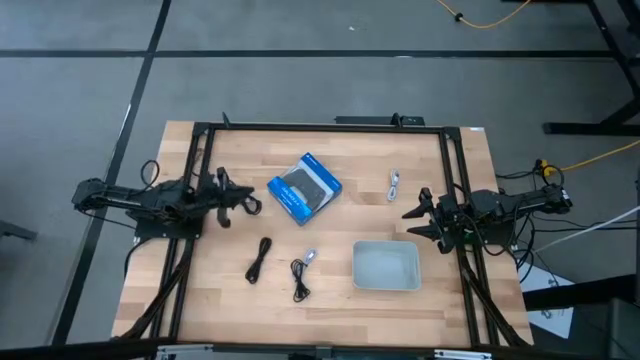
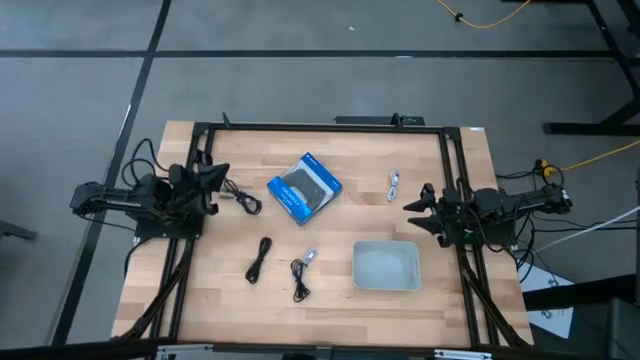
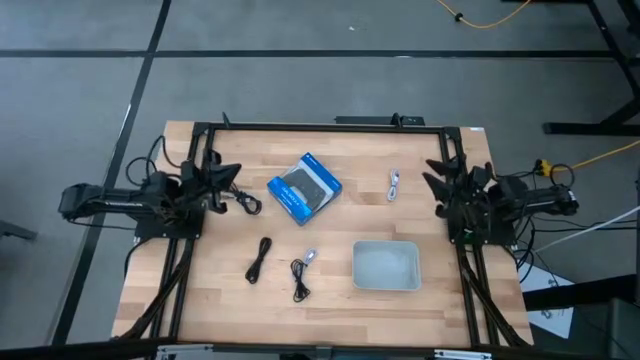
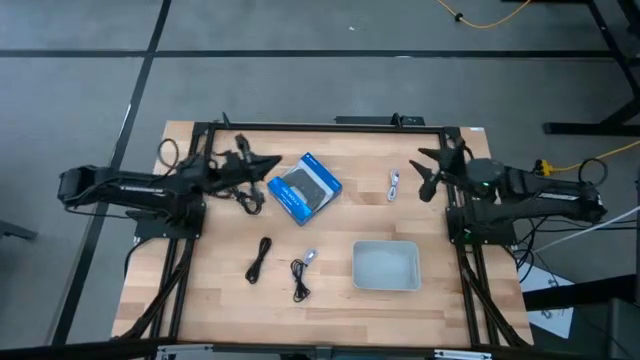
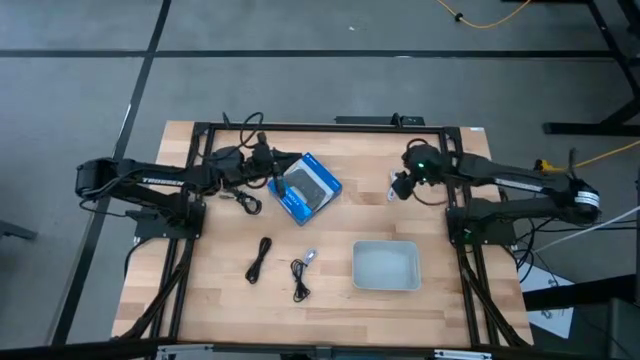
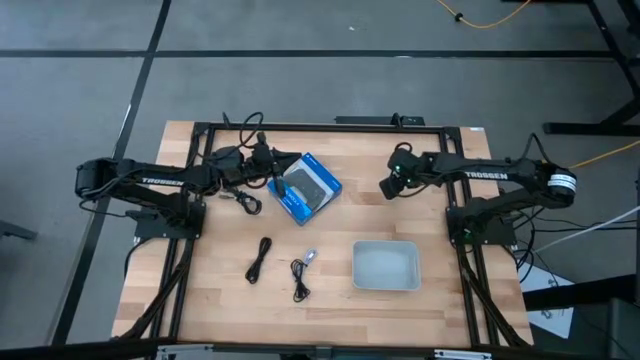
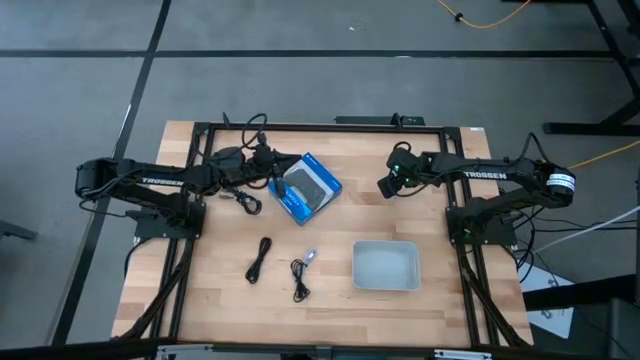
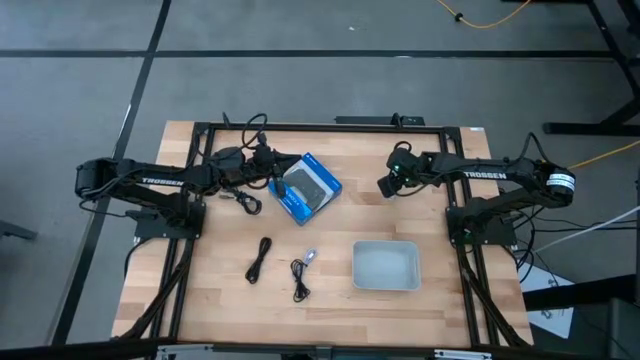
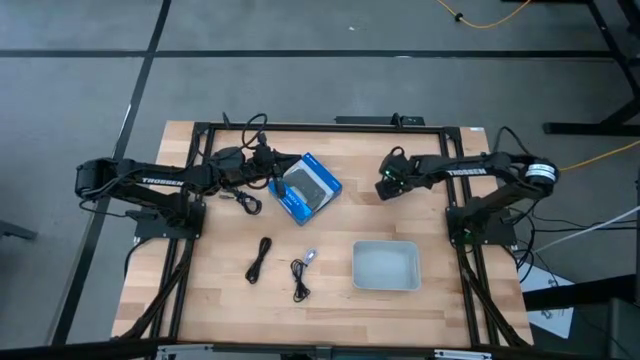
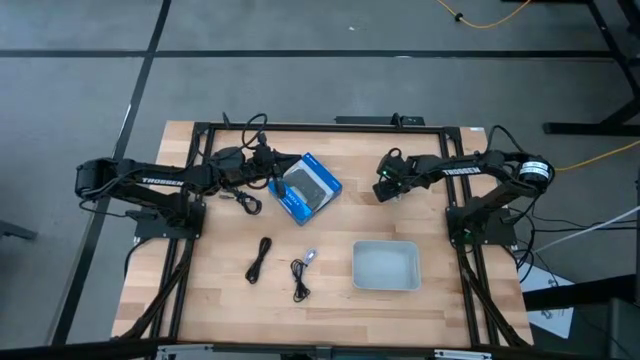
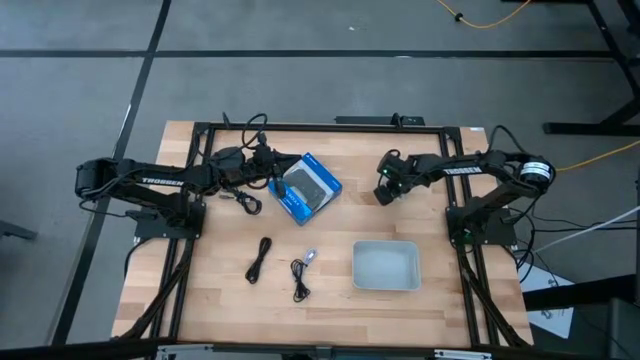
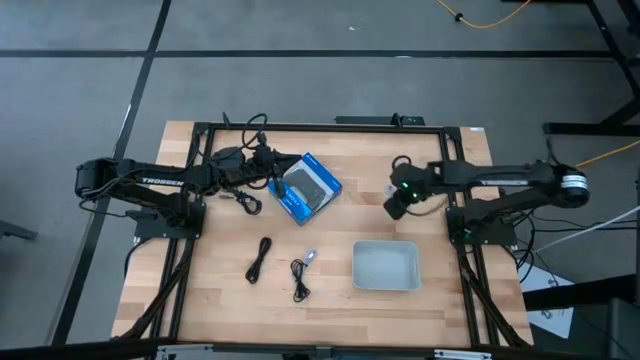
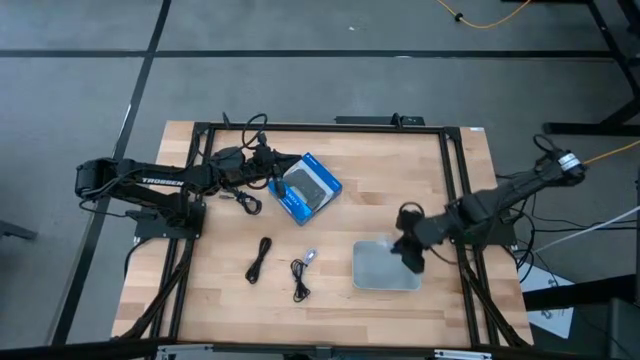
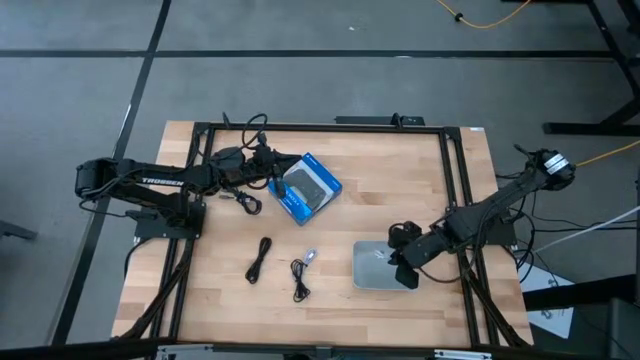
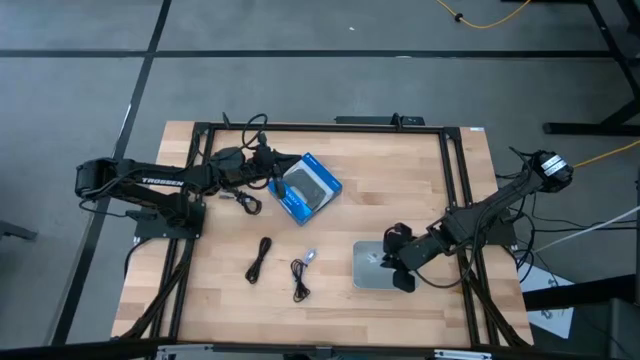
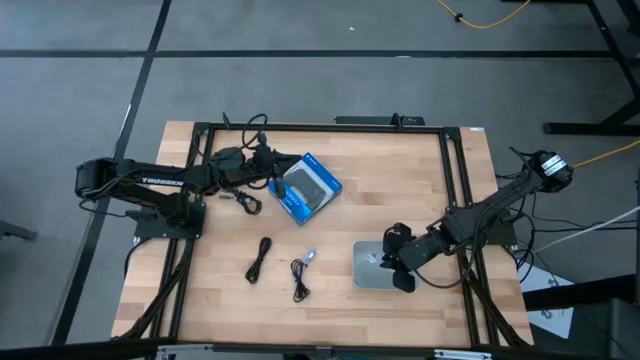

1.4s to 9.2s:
Task: Pick and place USB-C Cables
Put the top white usb cable into the gray bin

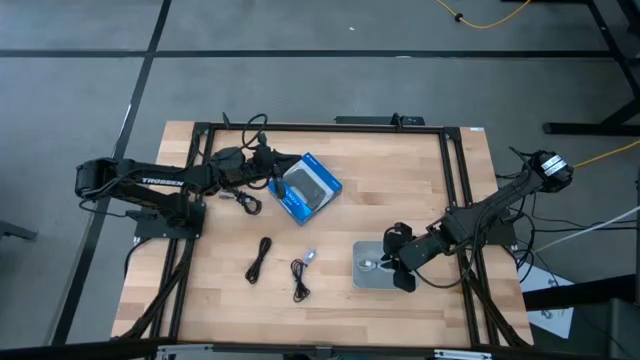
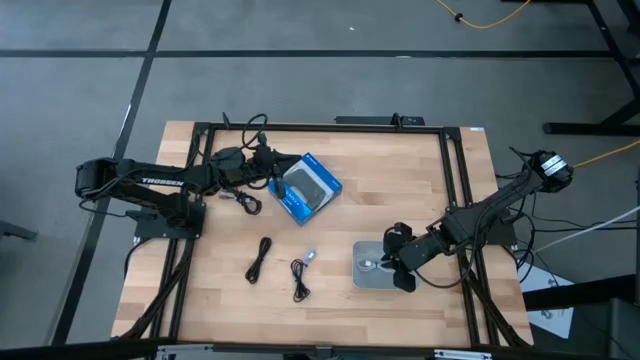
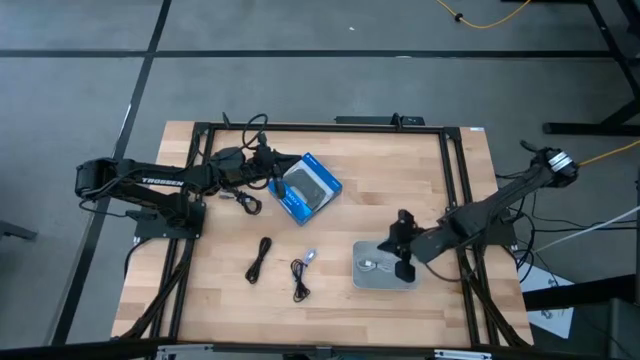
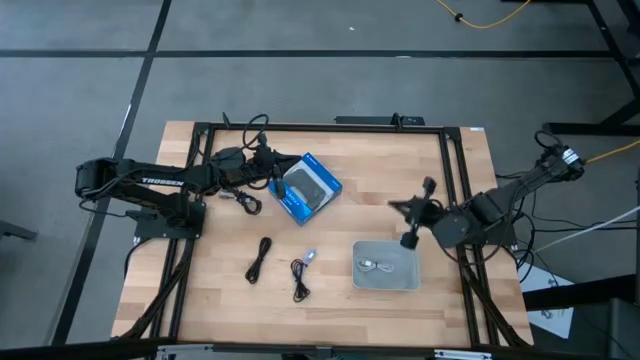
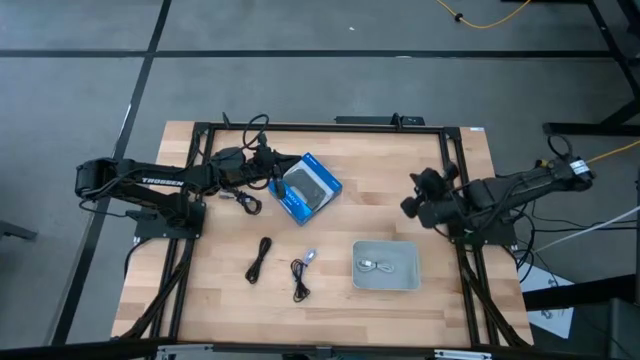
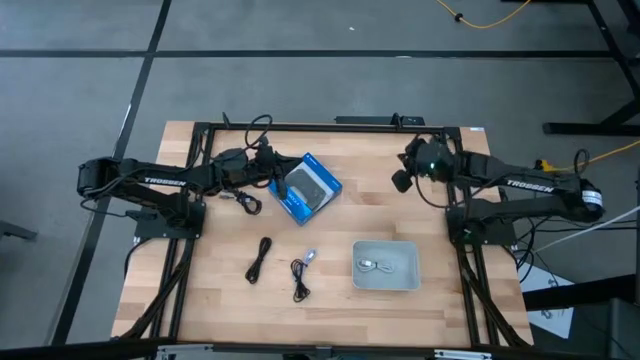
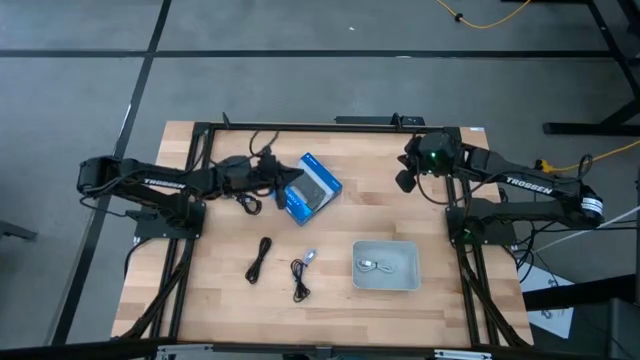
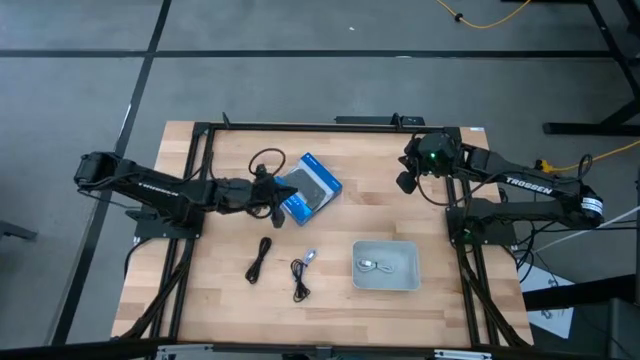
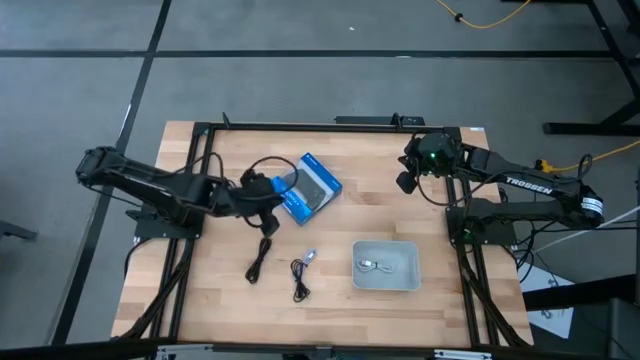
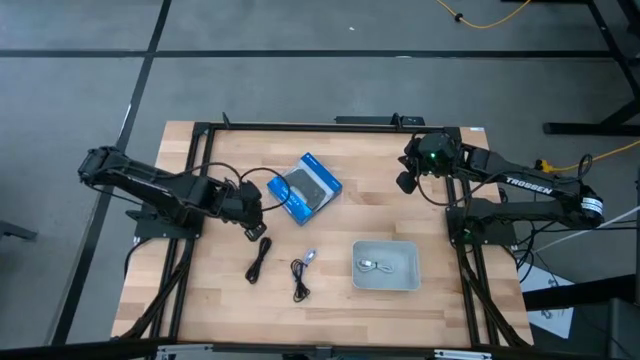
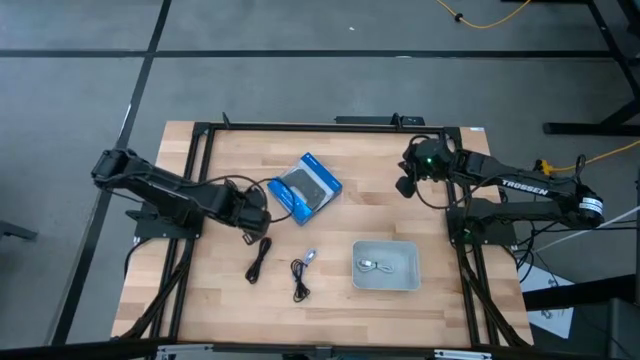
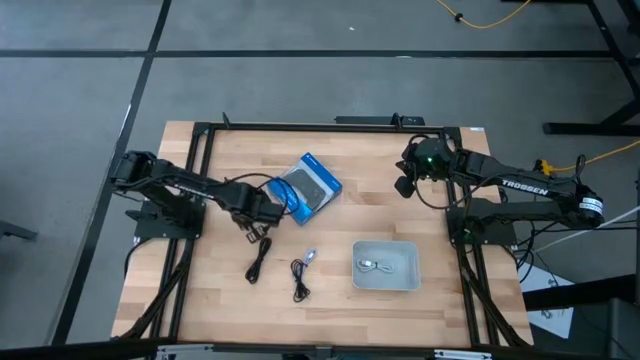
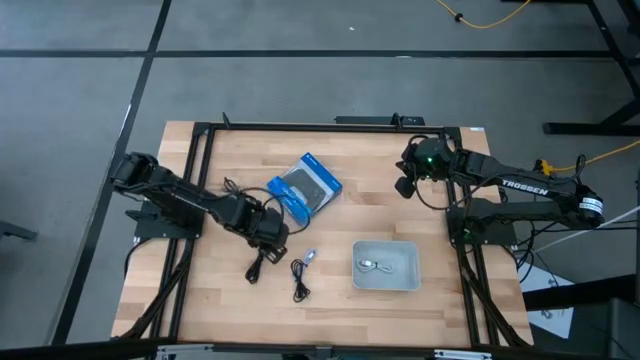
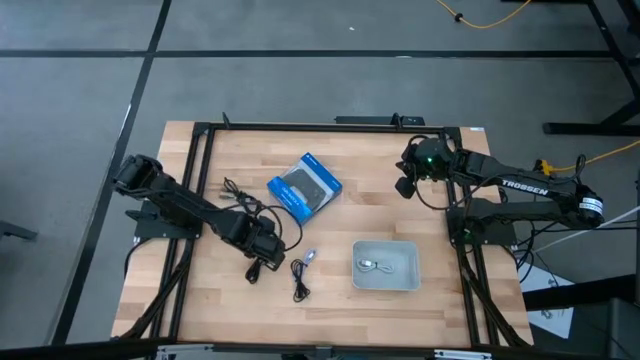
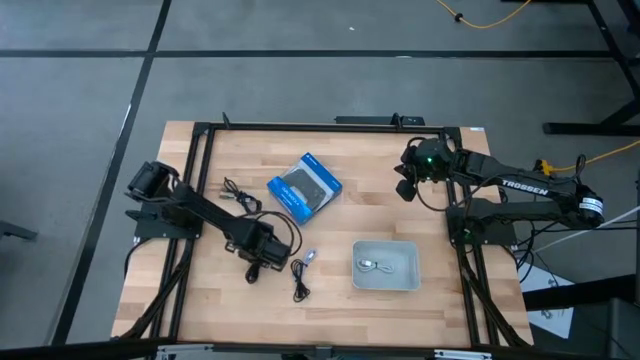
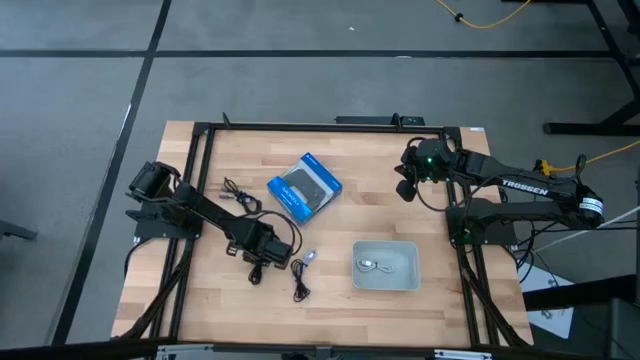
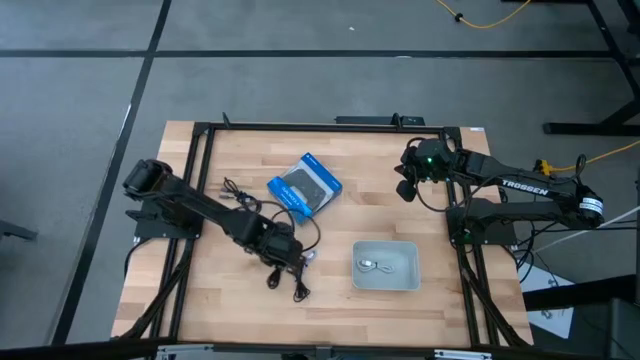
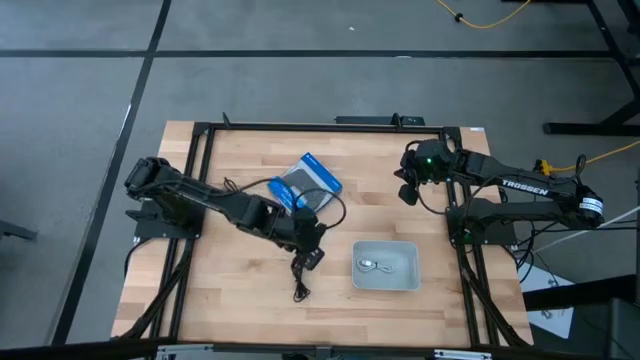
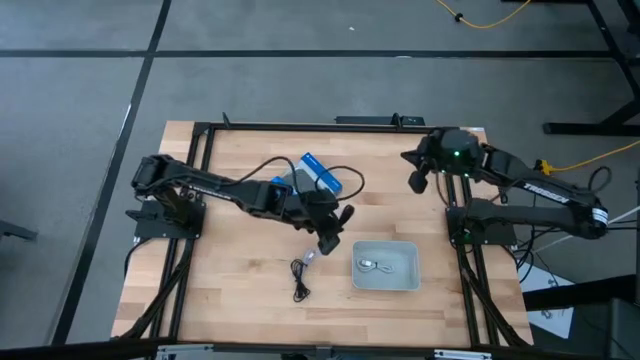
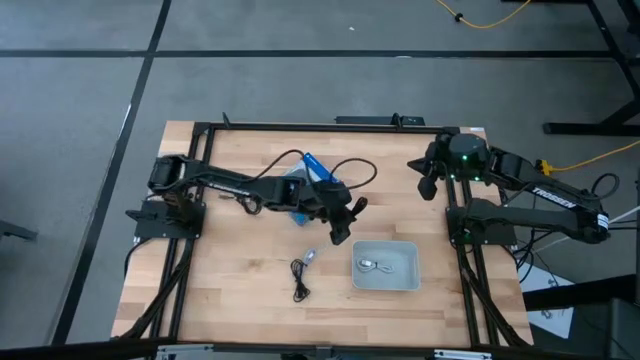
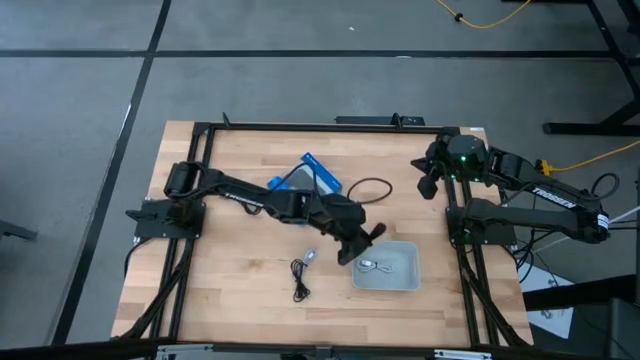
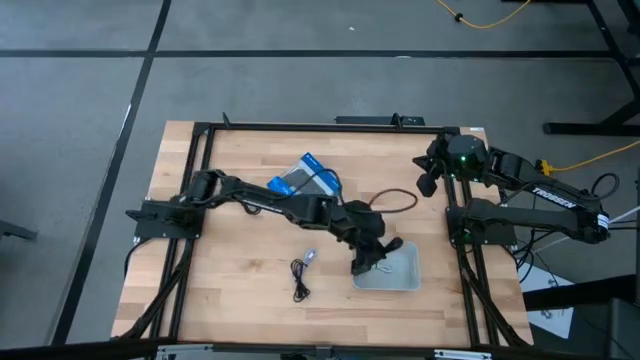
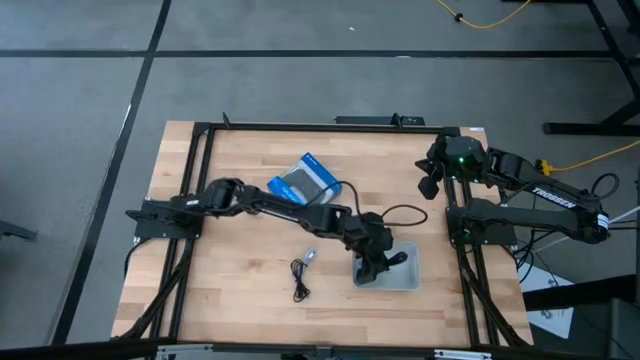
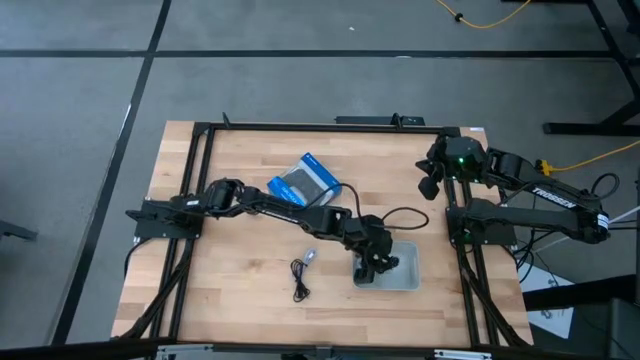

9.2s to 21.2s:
Put the bottom left black usb cable into the gray bin

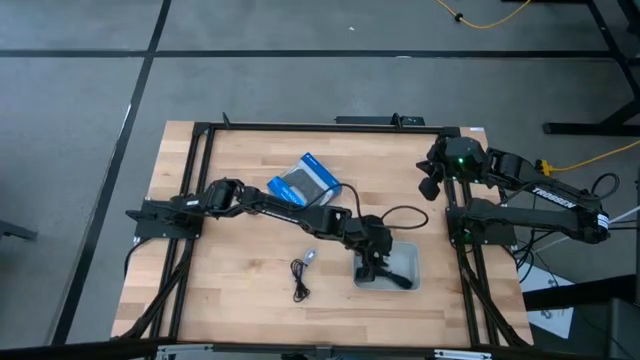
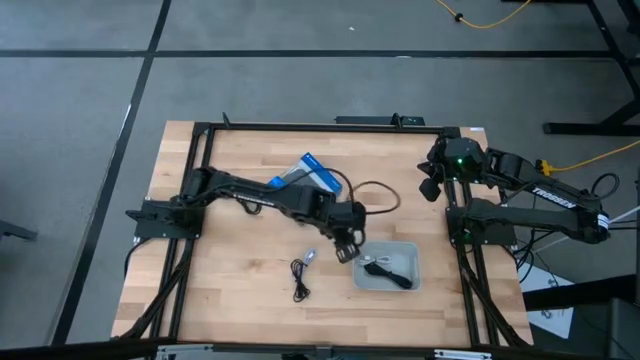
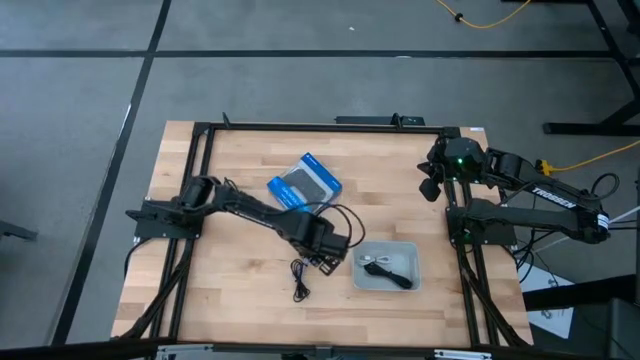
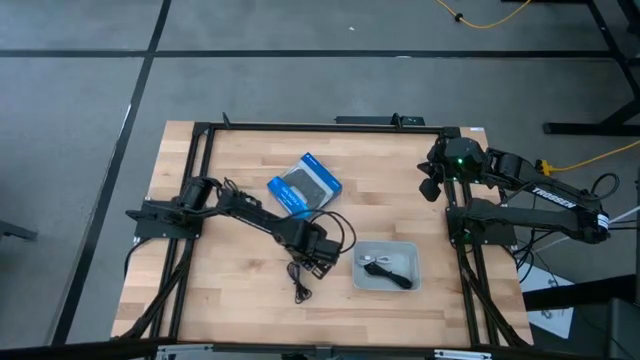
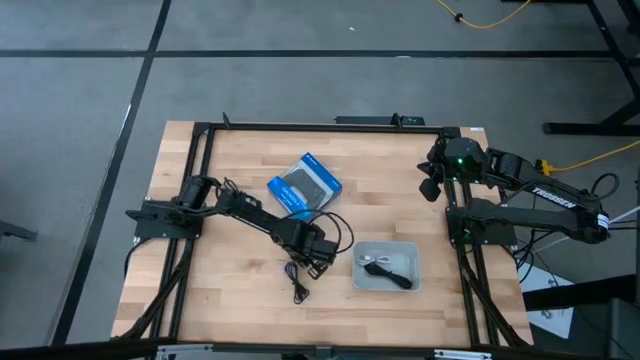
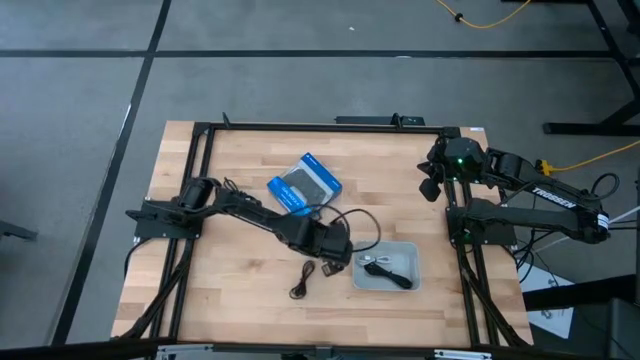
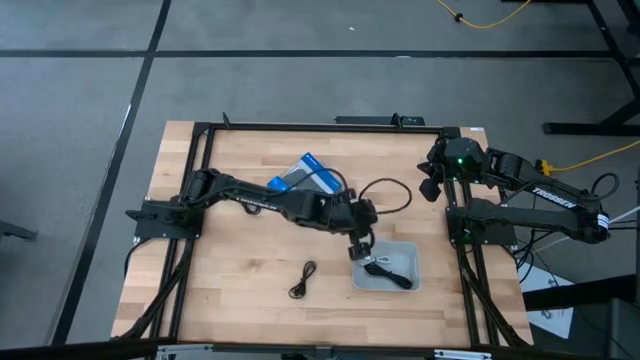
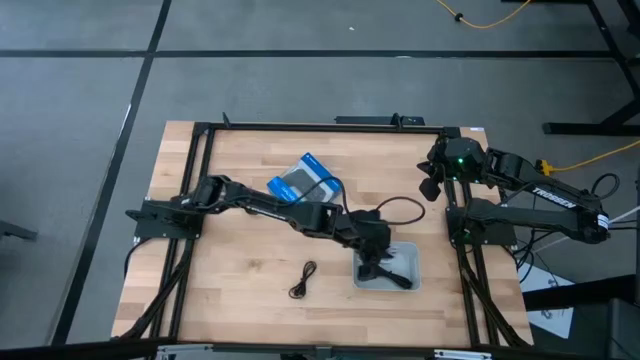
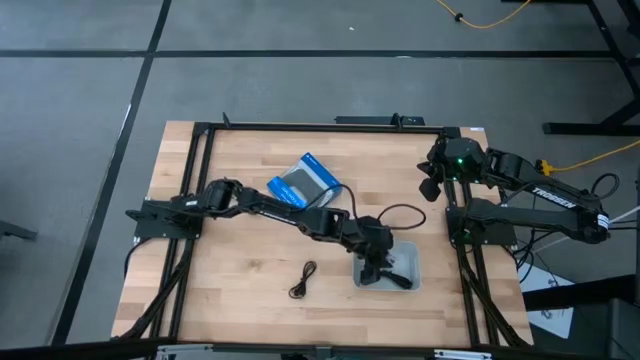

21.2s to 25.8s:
Put the white usb cable into the gray bin
